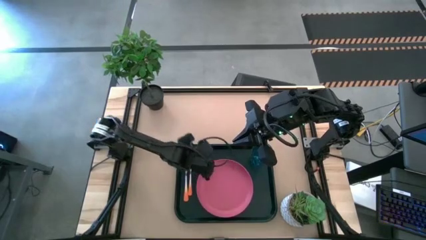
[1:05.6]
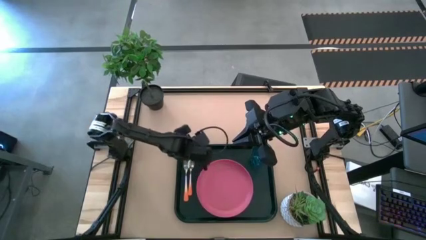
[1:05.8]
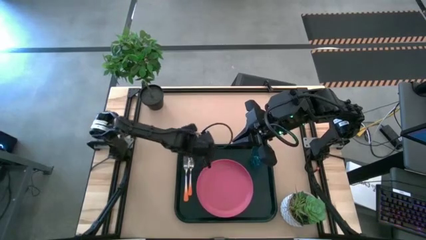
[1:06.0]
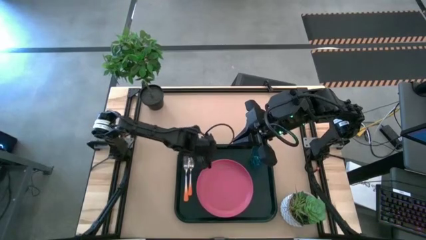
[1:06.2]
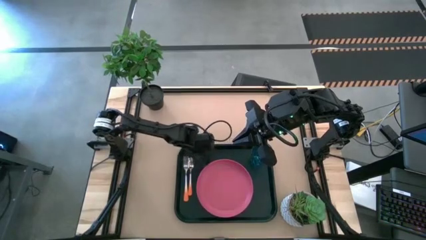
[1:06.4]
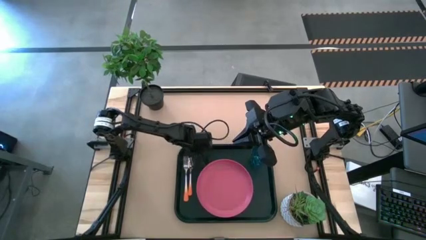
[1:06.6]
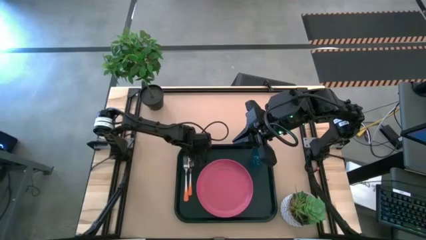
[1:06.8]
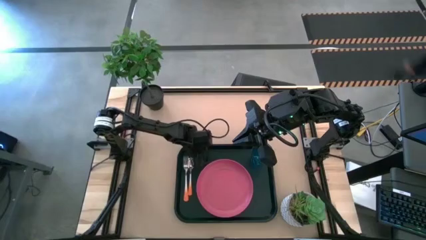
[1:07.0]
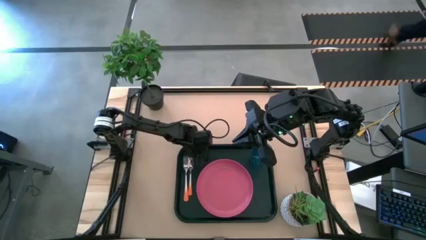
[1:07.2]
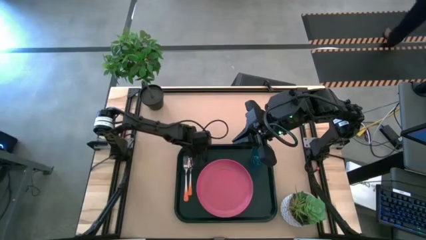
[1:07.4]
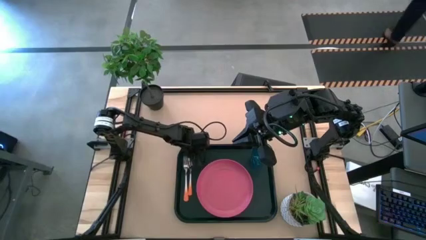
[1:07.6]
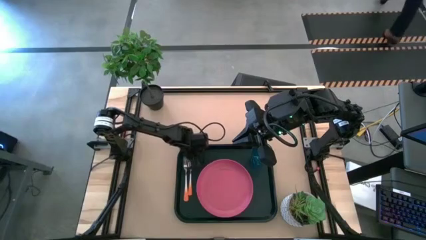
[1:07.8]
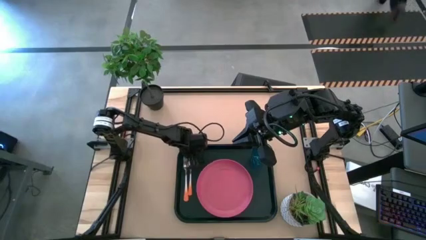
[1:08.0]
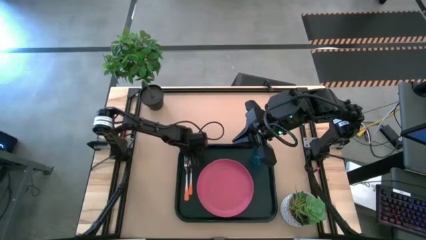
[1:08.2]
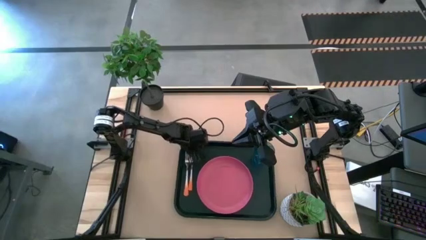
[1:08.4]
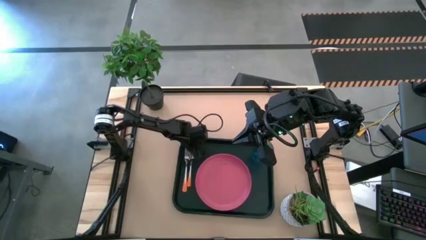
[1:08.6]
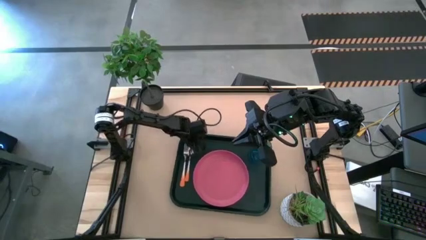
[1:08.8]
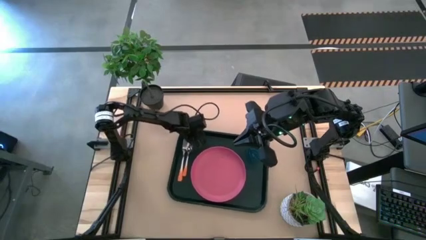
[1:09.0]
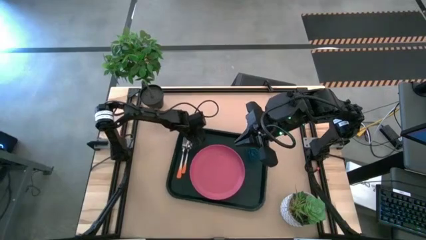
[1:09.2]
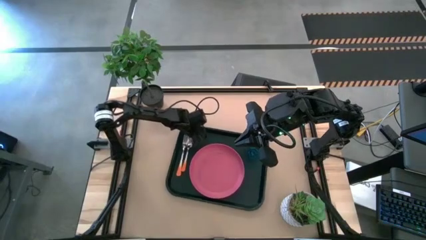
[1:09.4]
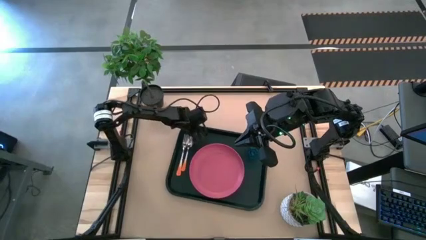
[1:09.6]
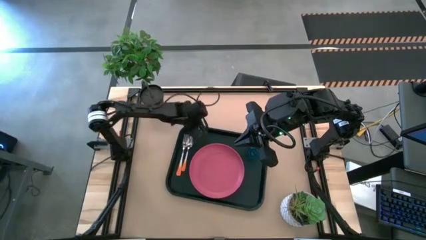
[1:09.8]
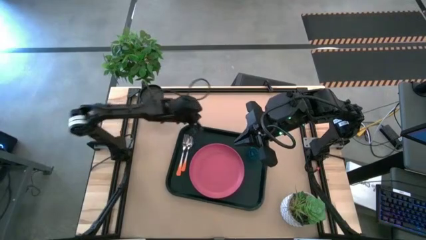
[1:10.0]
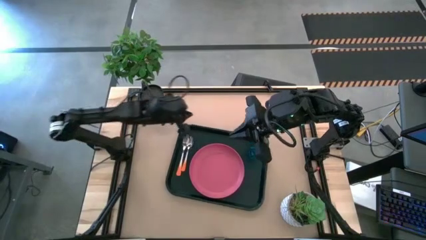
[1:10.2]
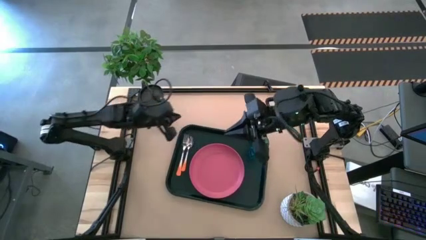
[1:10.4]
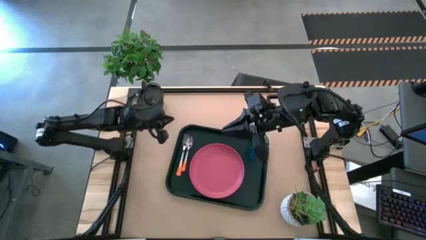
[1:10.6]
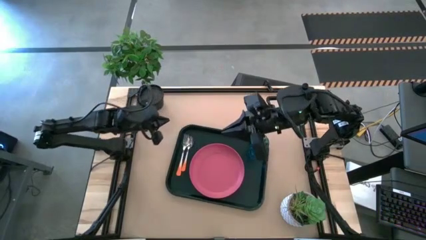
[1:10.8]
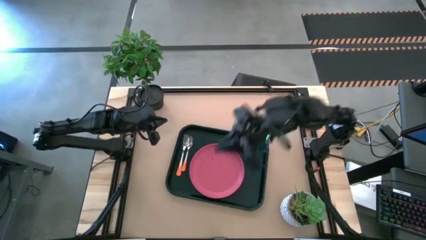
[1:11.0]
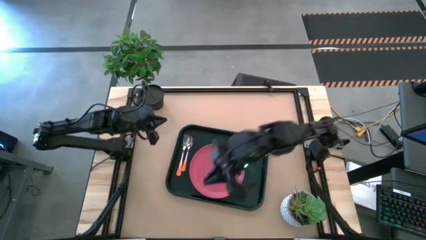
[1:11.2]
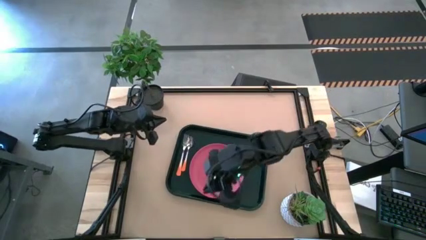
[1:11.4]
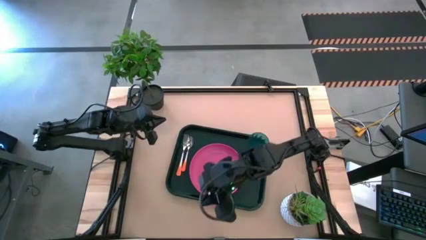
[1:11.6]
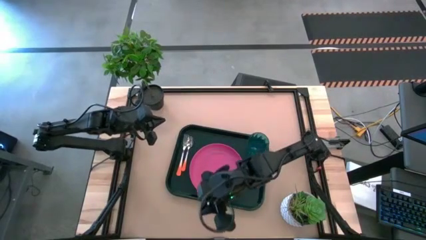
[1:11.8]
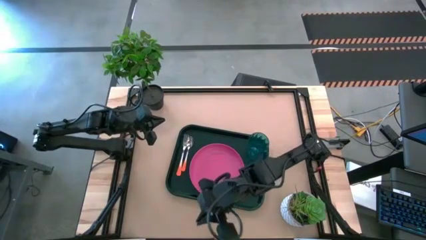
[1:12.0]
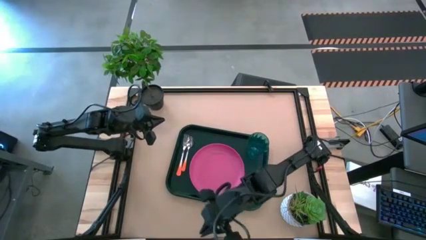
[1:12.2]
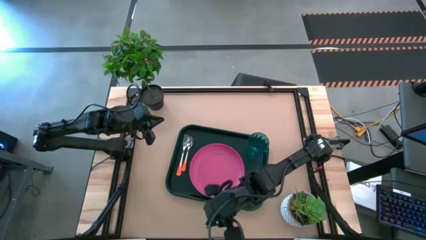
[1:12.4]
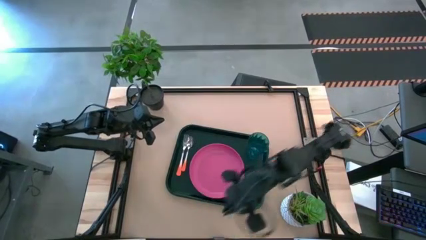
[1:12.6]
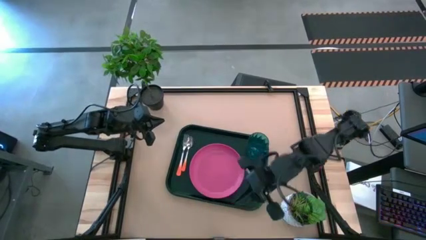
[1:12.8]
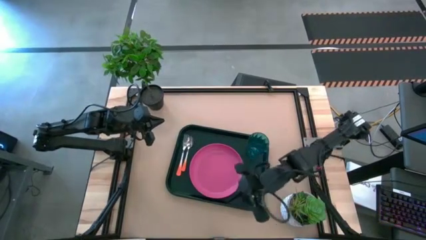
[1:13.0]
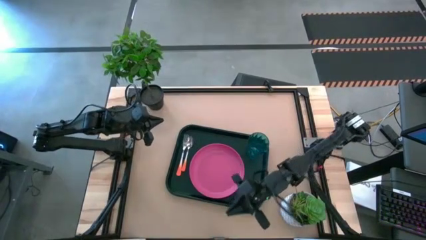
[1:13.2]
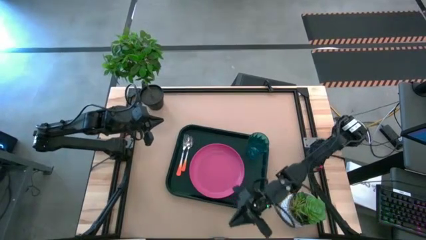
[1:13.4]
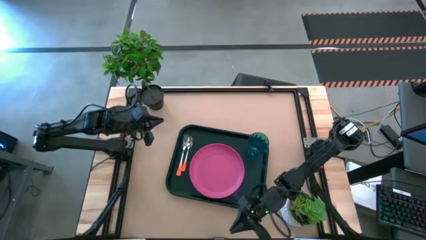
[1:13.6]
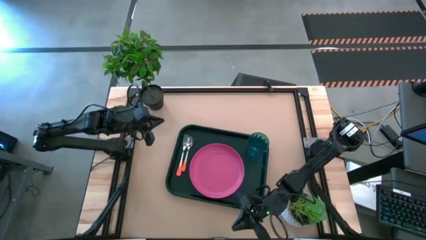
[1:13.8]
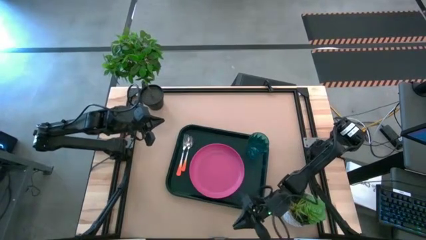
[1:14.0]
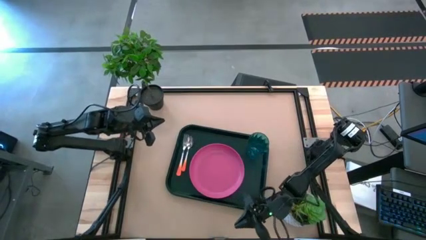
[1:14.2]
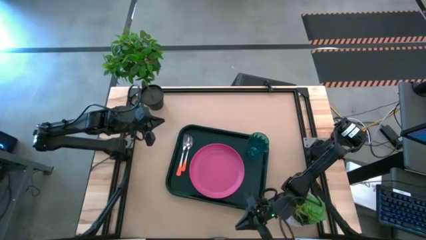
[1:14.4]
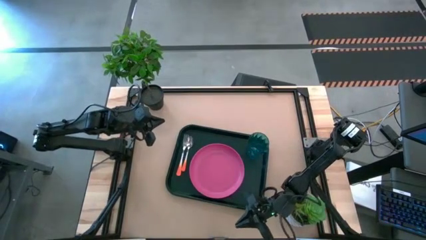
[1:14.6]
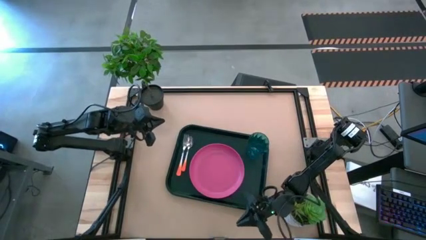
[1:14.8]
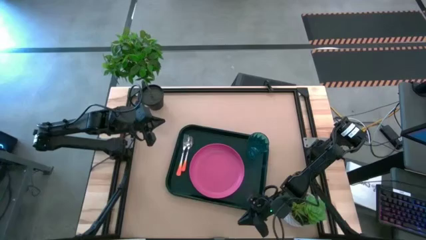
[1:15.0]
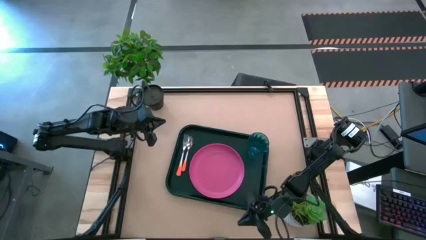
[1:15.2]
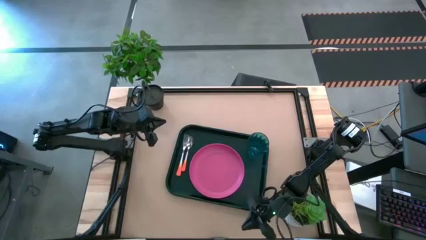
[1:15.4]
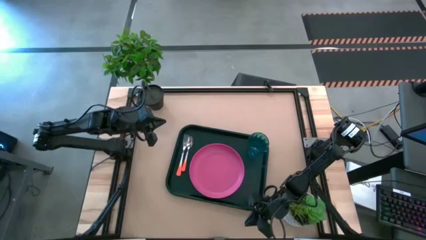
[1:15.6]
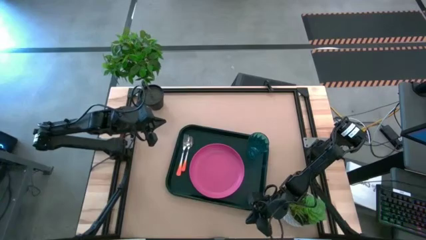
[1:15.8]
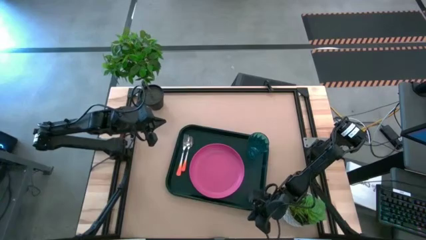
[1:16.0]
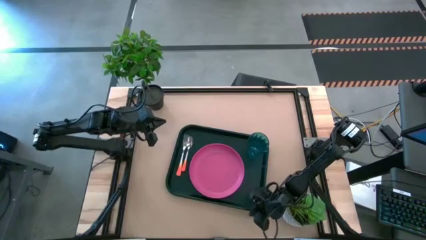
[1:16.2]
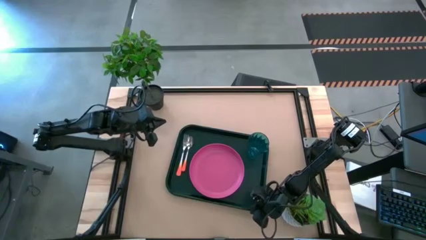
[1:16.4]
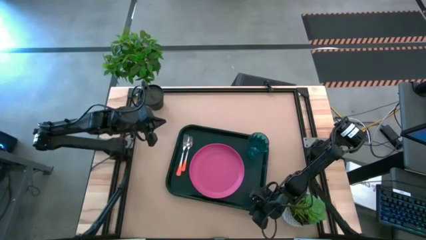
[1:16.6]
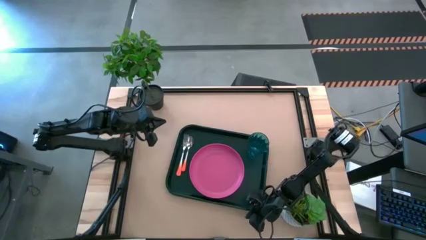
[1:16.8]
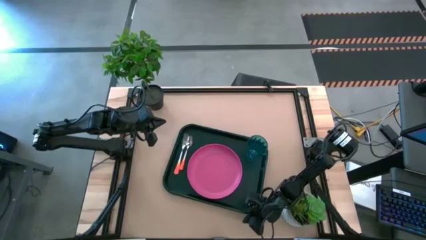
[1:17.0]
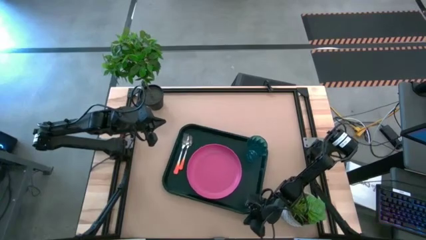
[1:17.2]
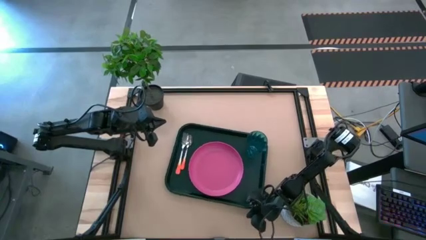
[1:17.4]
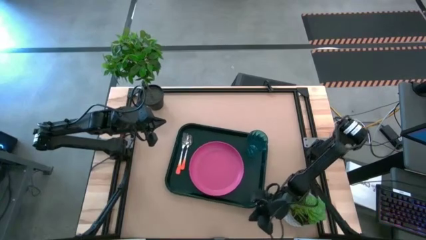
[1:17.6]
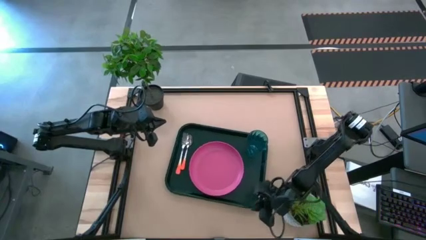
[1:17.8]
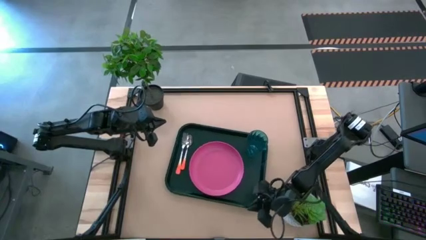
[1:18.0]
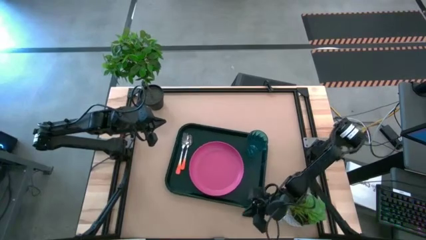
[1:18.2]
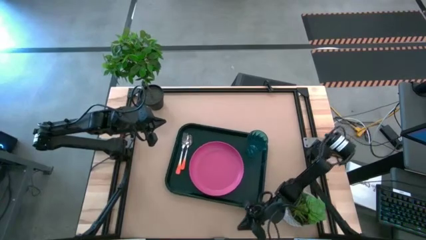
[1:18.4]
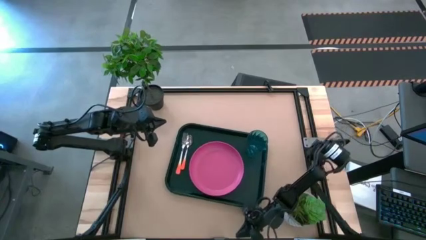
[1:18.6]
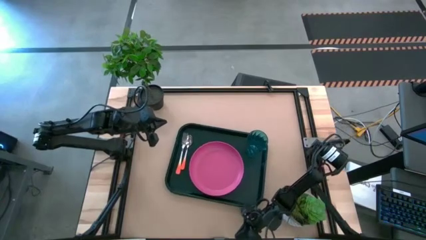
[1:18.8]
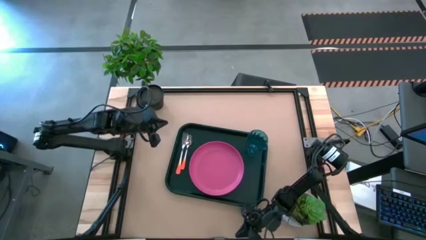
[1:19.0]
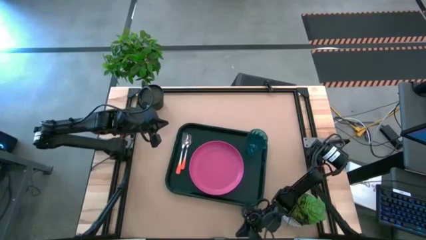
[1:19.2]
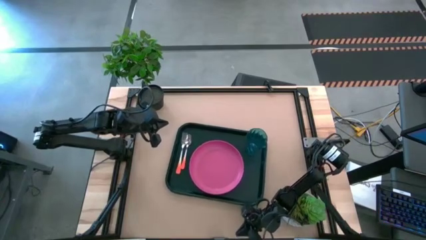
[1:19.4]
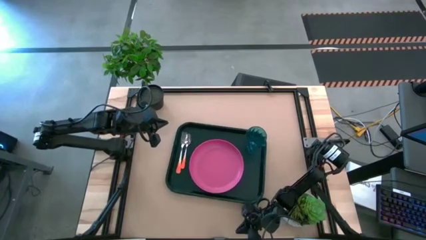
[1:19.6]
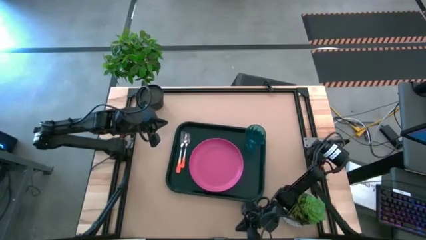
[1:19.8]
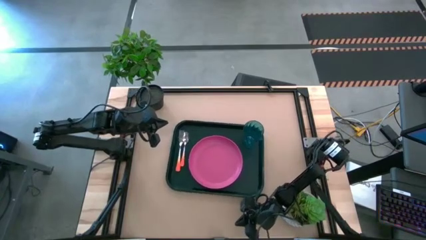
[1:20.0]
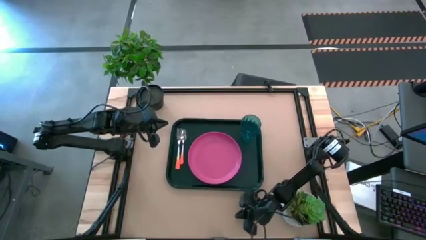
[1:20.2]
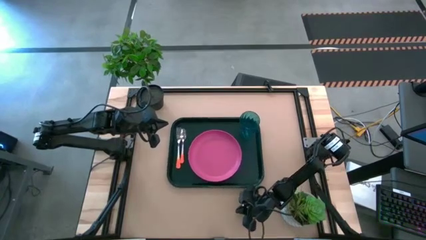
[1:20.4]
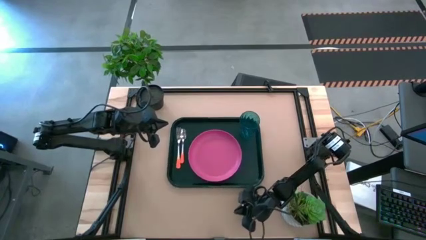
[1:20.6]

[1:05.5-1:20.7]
Task: Pick and place plate/cup/fork/spoon on tray
Move the black tray to the center of the table
